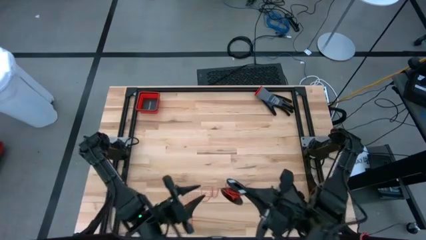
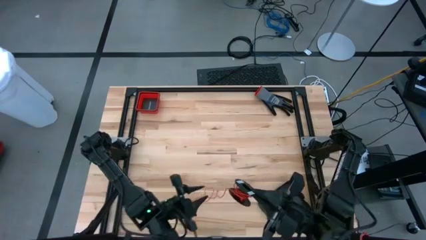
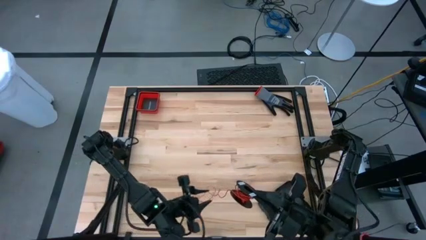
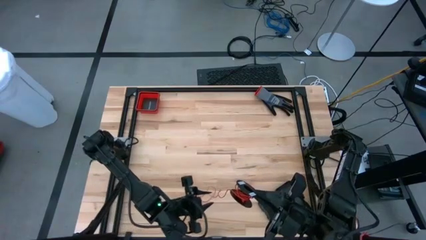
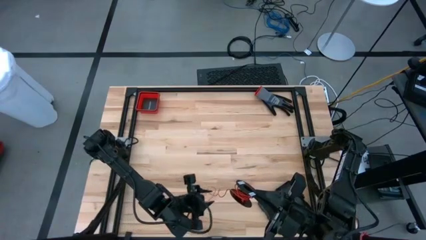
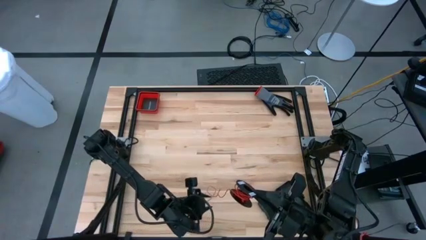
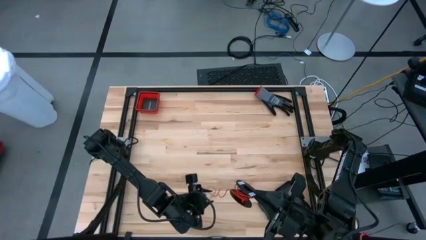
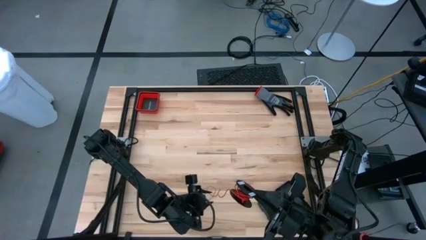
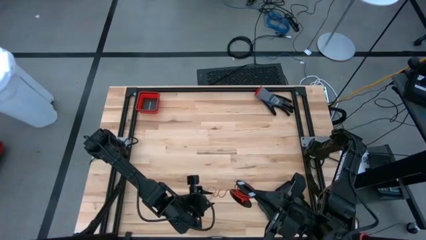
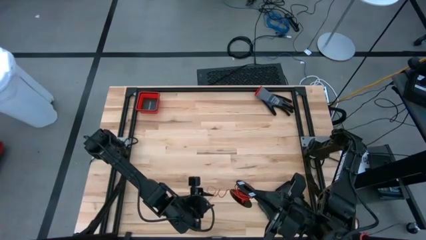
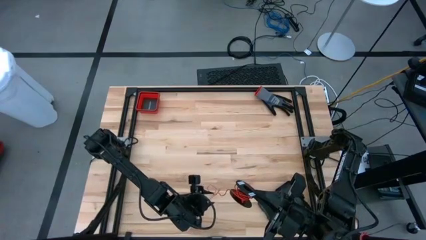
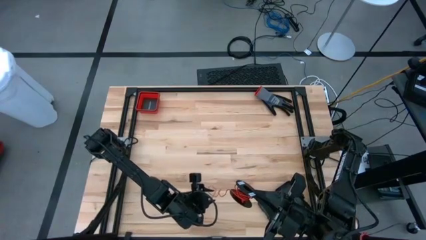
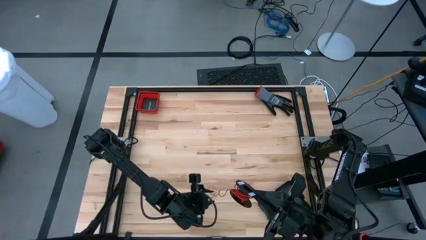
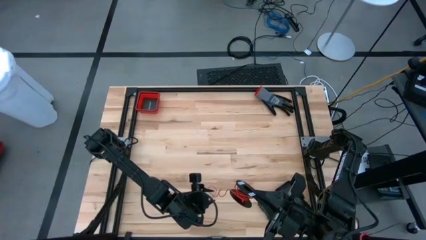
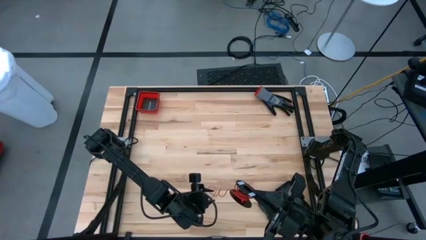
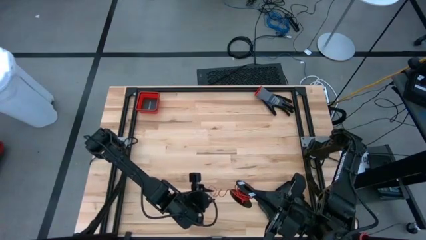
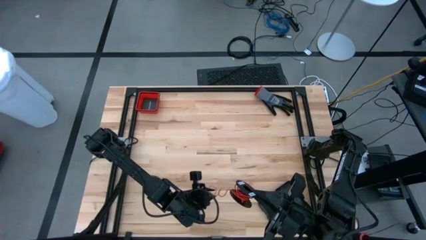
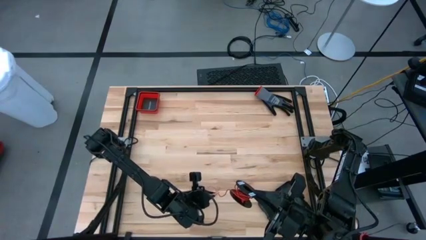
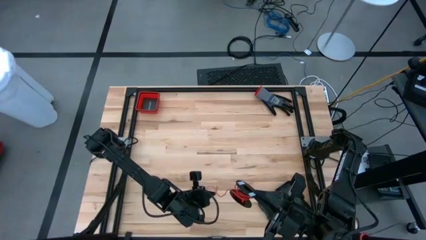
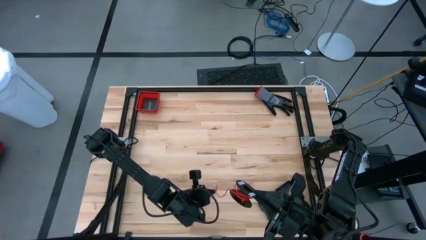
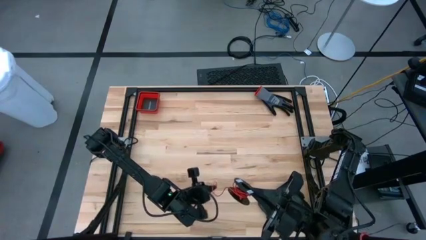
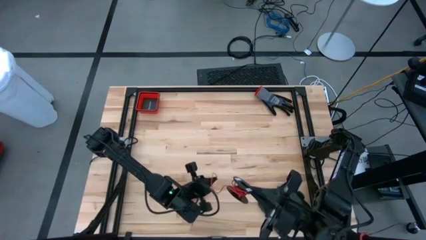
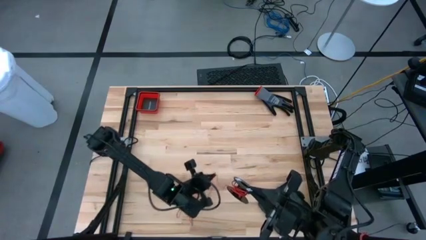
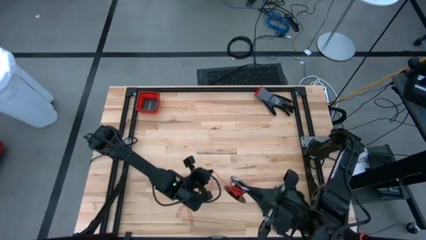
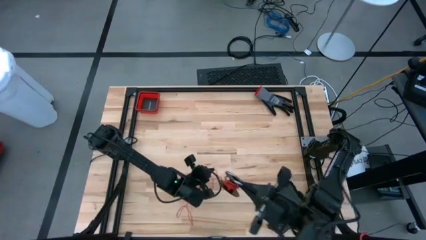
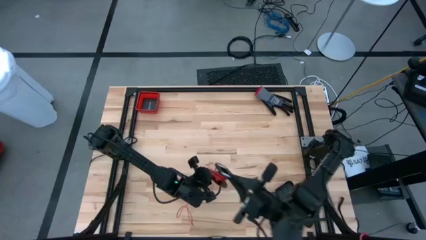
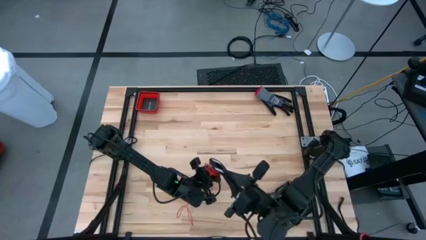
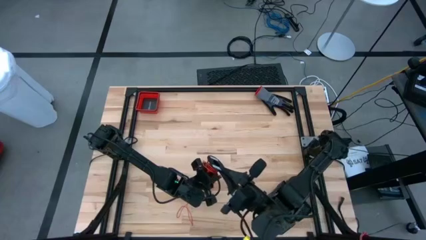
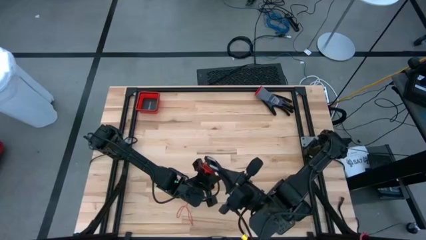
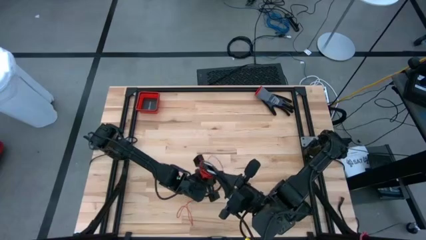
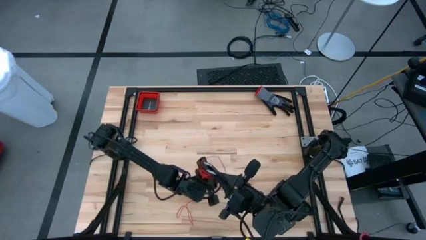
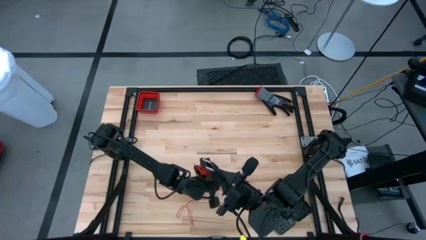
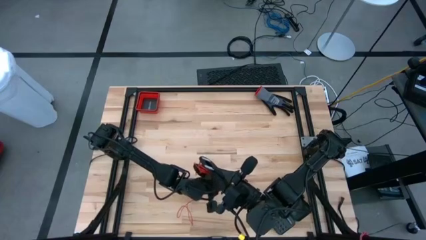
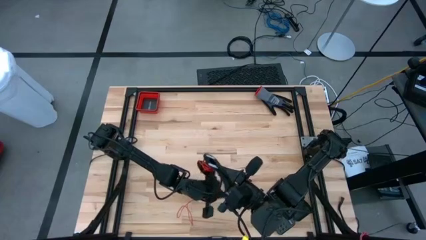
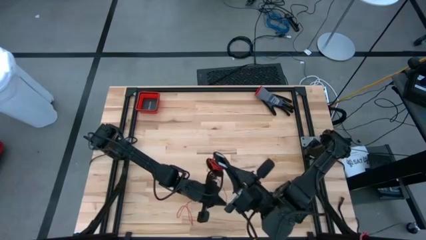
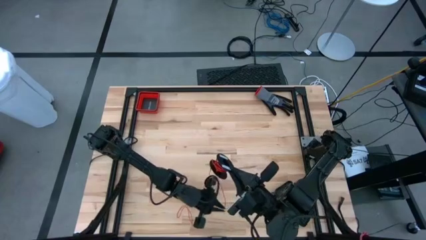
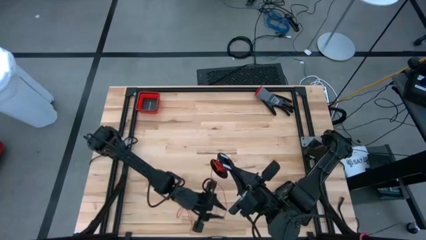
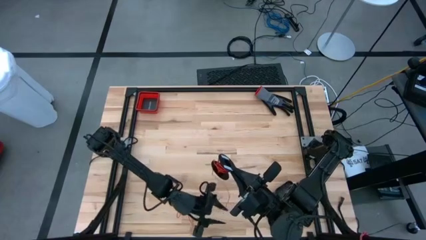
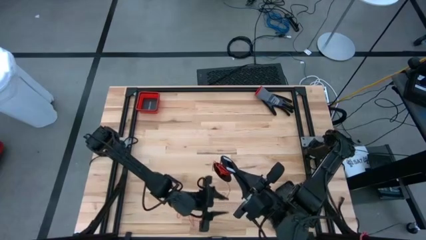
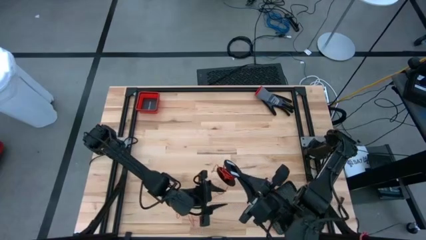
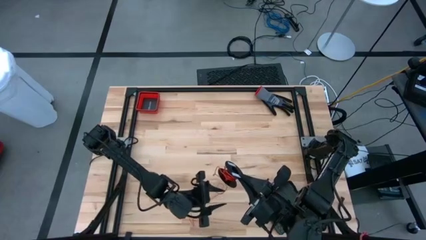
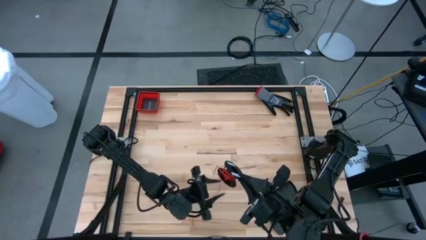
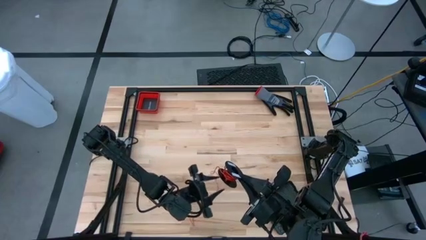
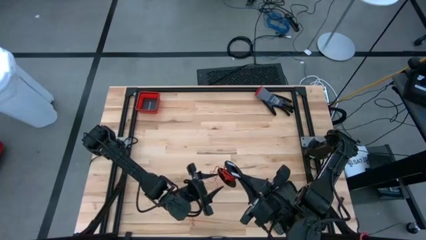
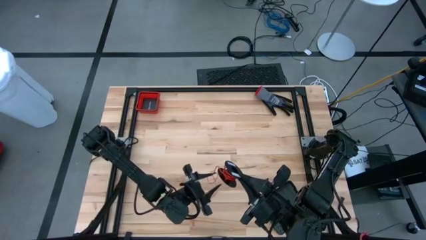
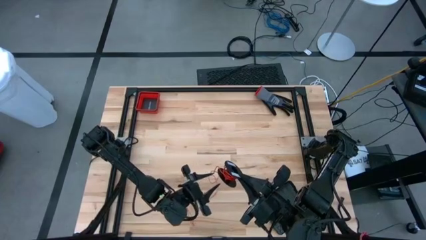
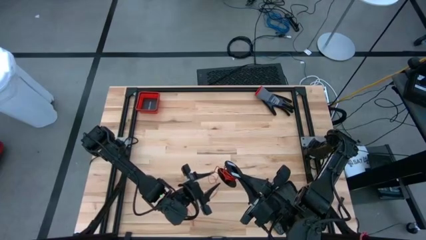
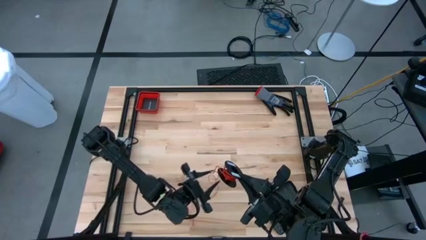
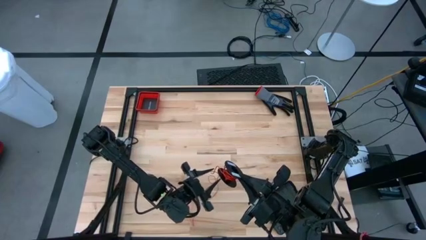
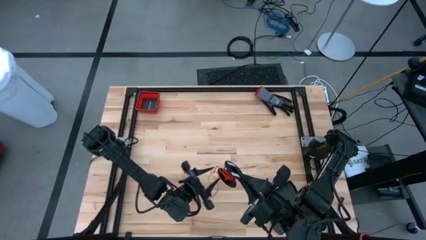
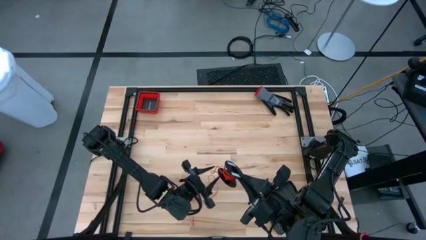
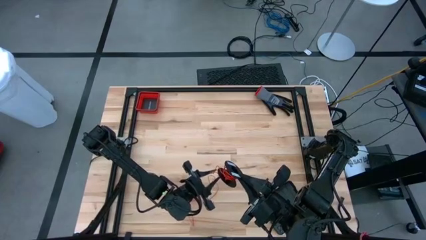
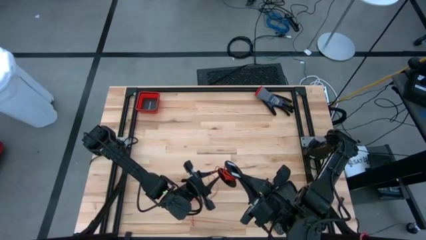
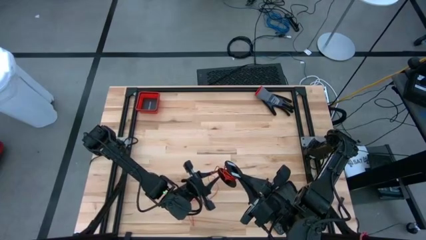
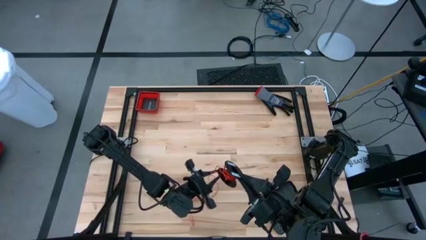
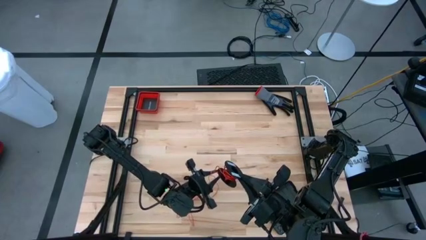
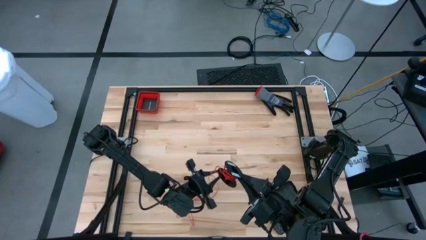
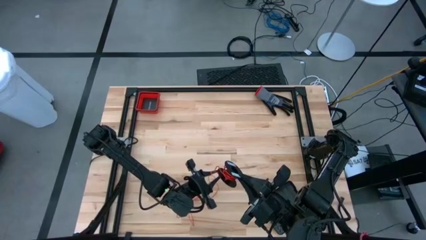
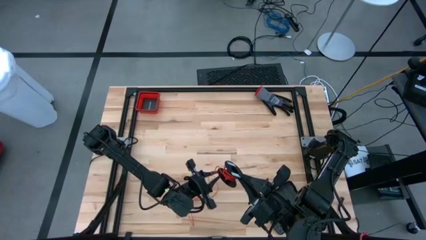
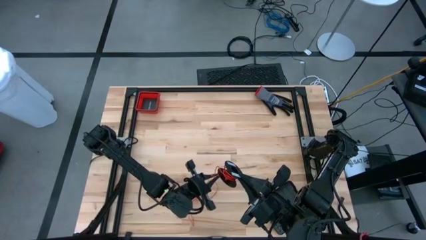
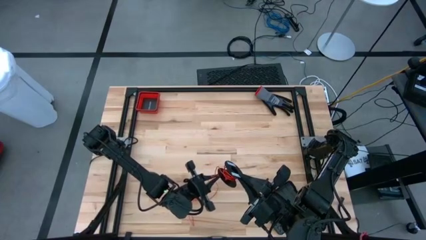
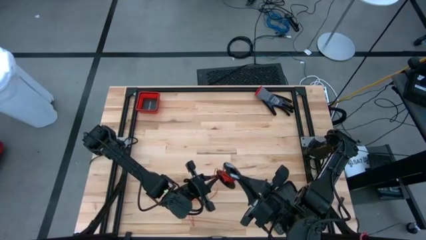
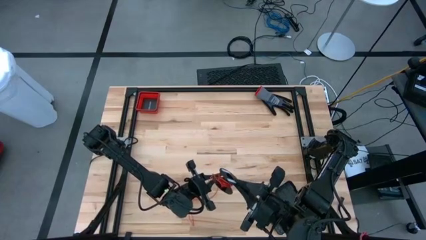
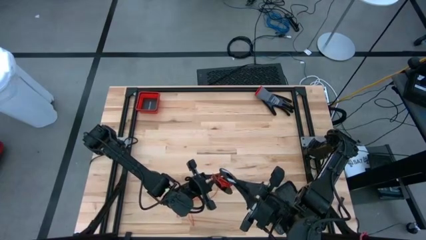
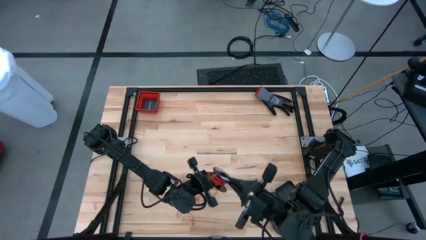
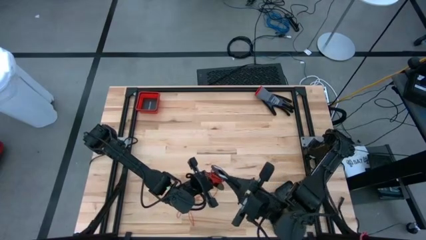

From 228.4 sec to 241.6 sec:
Task: Coil cords
Coil the red wire onto the spool
